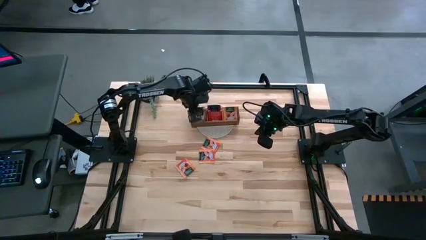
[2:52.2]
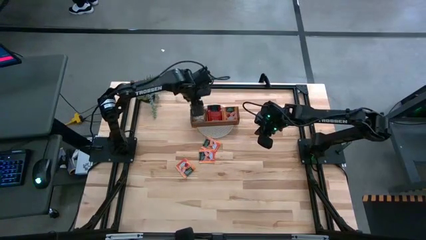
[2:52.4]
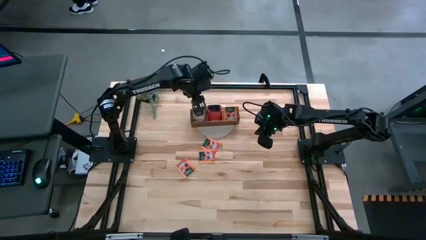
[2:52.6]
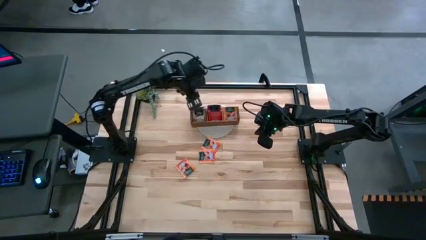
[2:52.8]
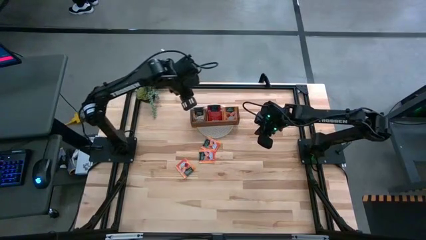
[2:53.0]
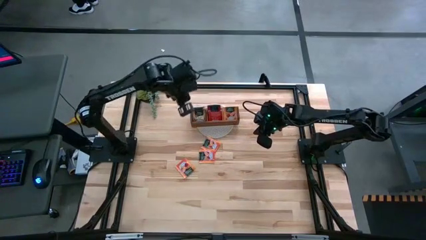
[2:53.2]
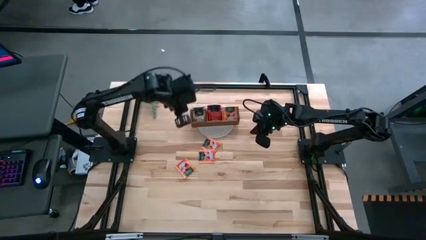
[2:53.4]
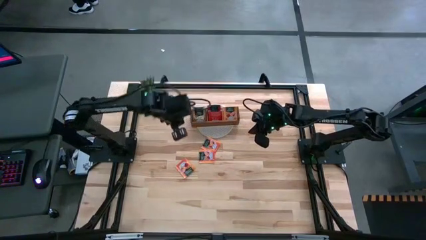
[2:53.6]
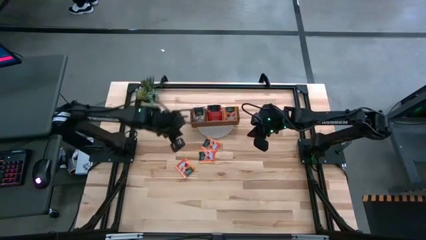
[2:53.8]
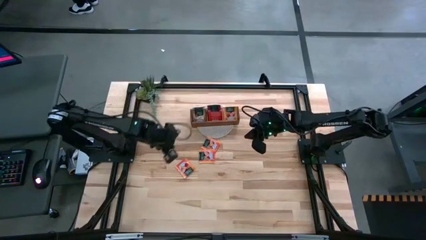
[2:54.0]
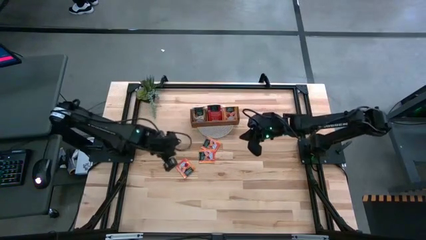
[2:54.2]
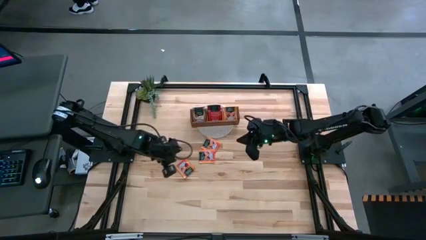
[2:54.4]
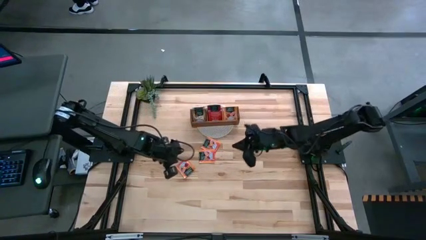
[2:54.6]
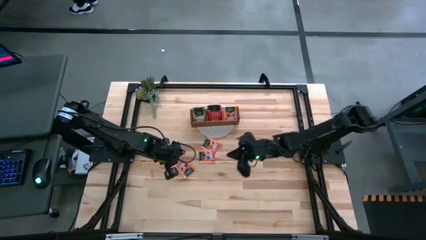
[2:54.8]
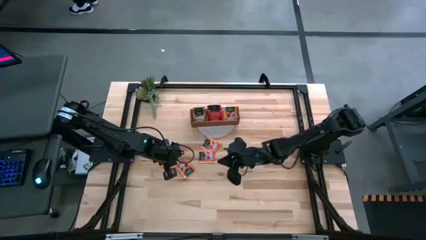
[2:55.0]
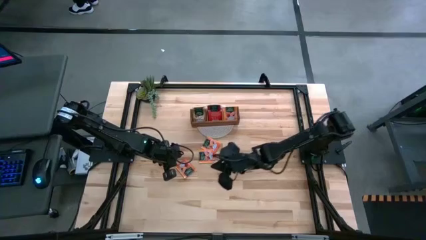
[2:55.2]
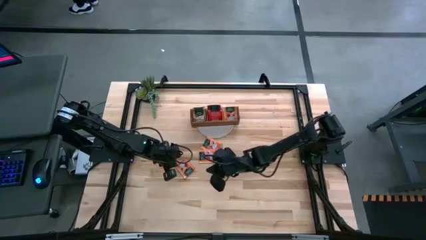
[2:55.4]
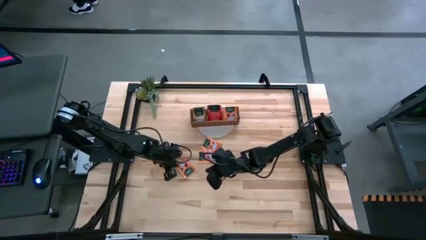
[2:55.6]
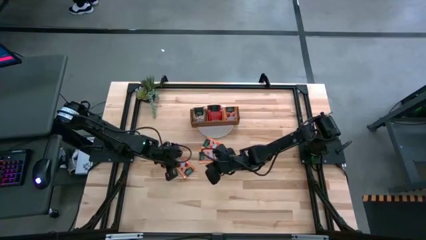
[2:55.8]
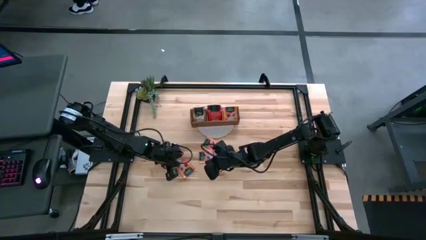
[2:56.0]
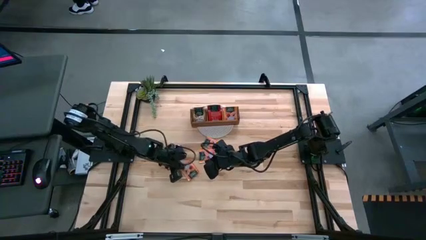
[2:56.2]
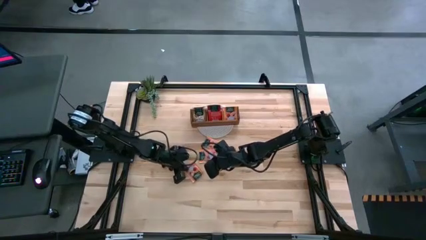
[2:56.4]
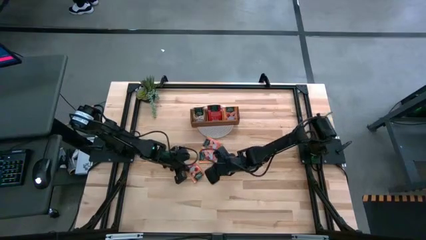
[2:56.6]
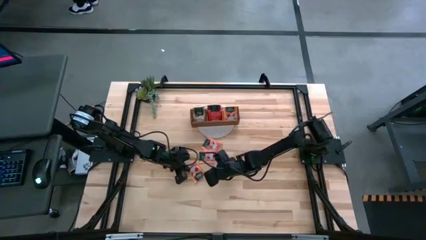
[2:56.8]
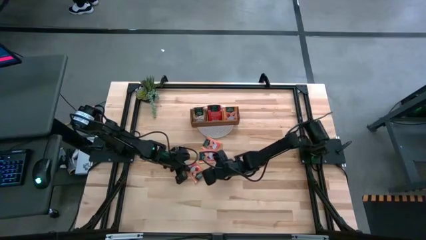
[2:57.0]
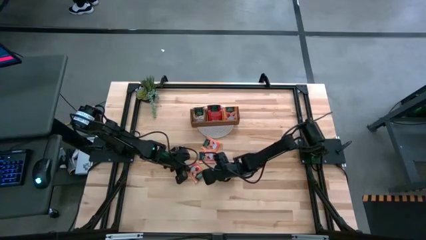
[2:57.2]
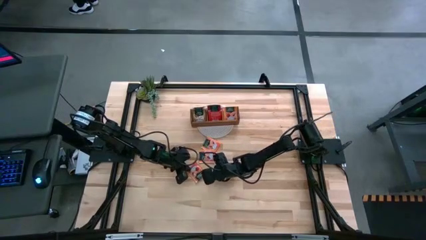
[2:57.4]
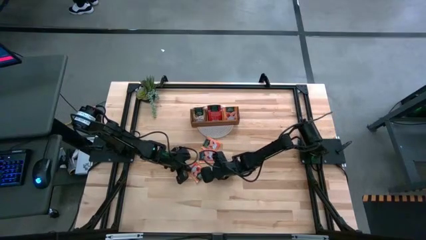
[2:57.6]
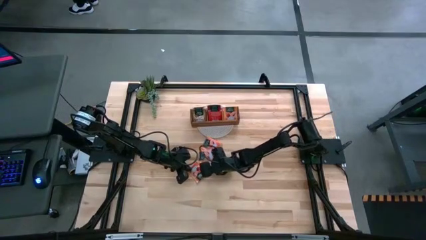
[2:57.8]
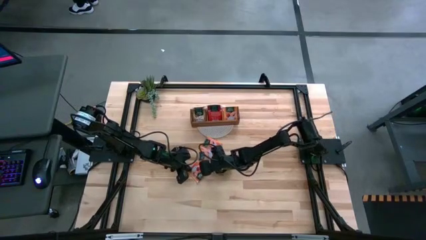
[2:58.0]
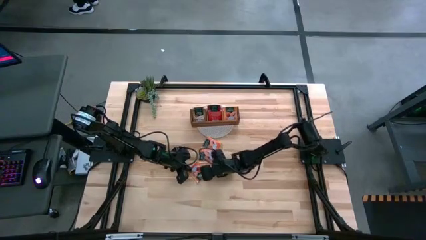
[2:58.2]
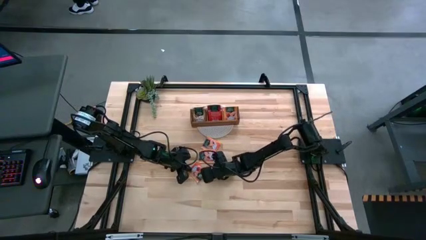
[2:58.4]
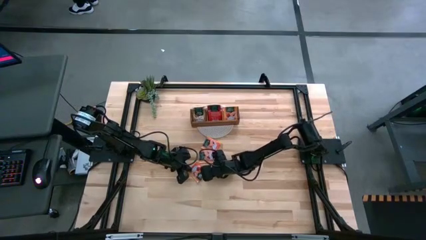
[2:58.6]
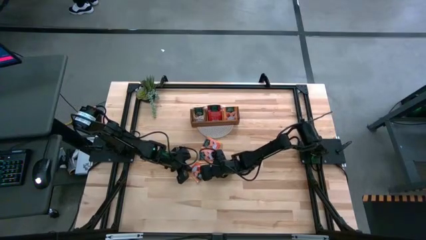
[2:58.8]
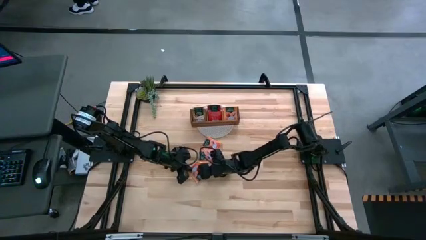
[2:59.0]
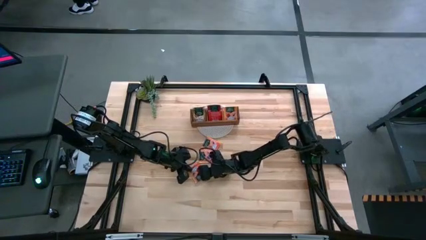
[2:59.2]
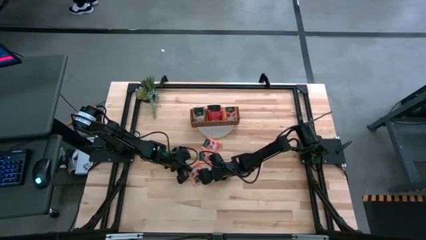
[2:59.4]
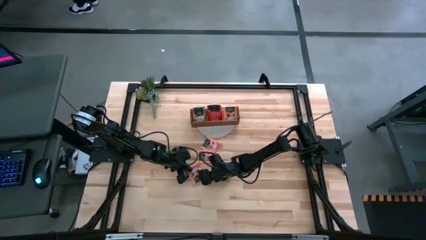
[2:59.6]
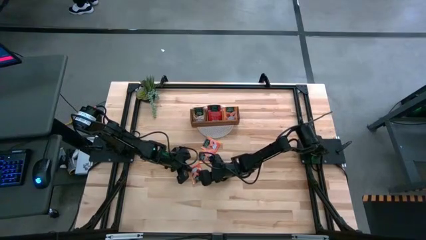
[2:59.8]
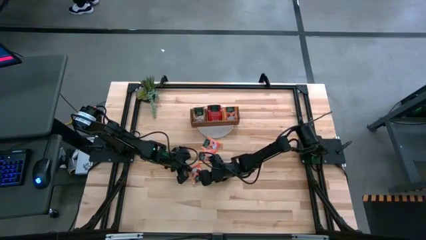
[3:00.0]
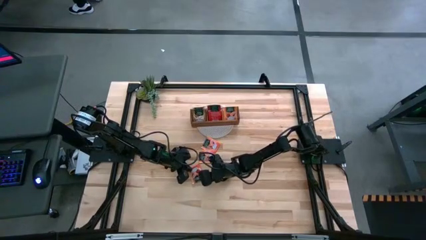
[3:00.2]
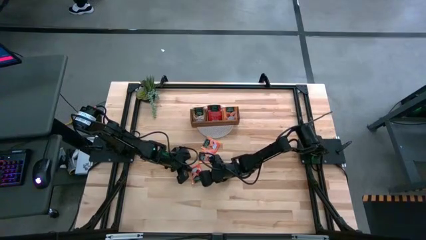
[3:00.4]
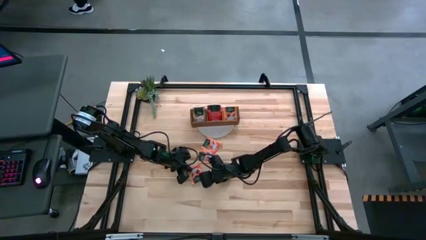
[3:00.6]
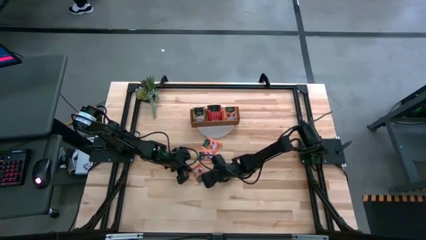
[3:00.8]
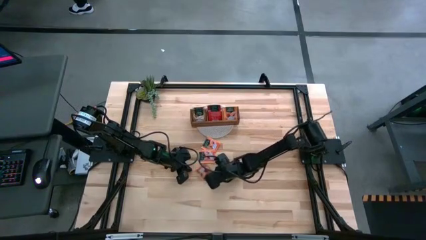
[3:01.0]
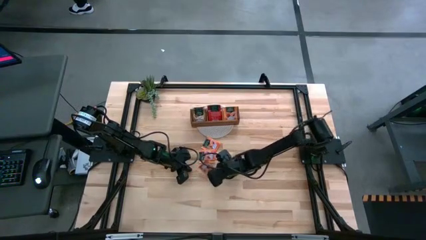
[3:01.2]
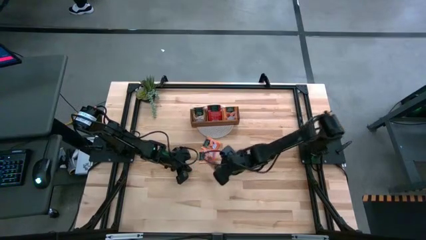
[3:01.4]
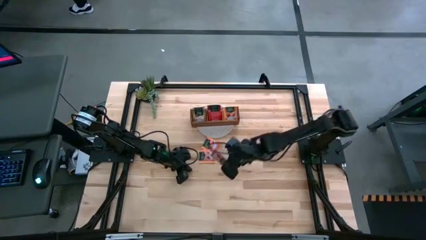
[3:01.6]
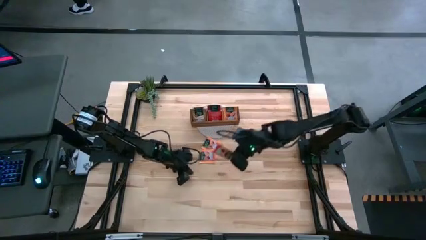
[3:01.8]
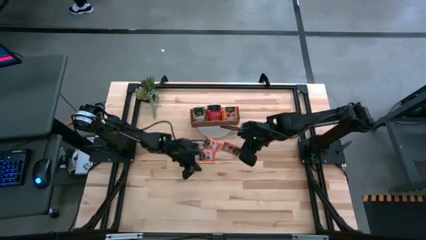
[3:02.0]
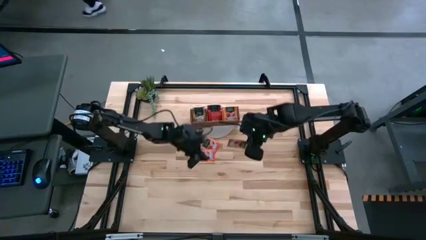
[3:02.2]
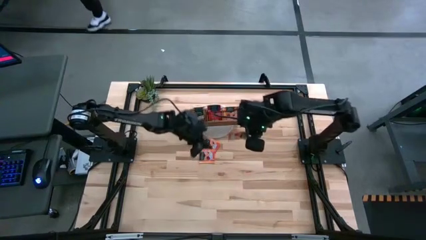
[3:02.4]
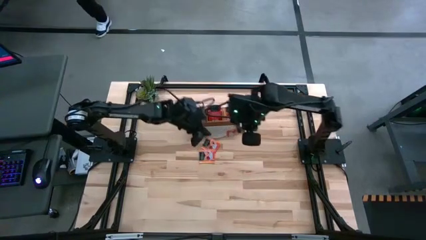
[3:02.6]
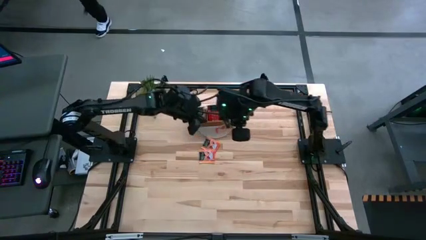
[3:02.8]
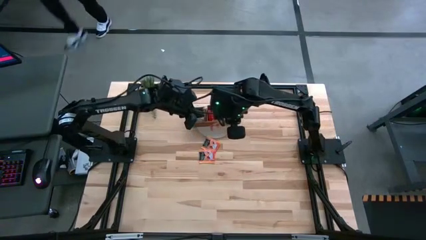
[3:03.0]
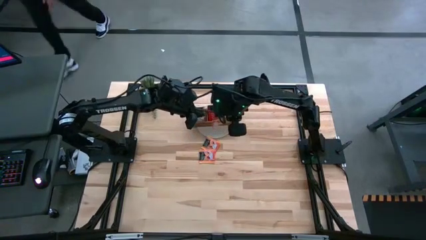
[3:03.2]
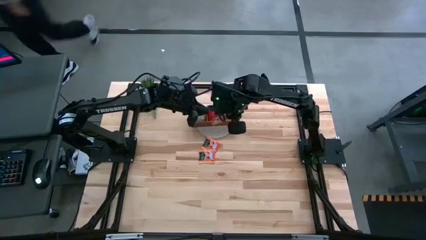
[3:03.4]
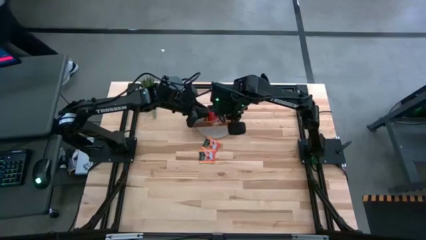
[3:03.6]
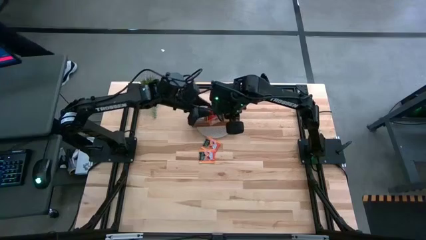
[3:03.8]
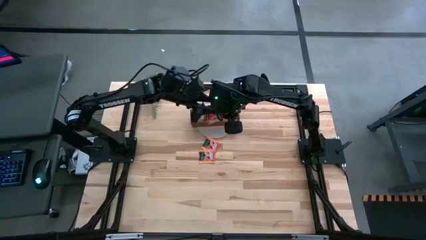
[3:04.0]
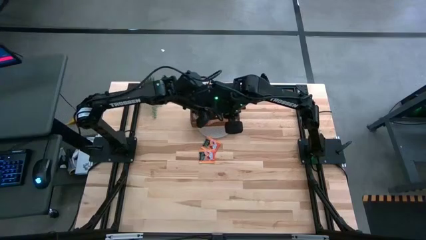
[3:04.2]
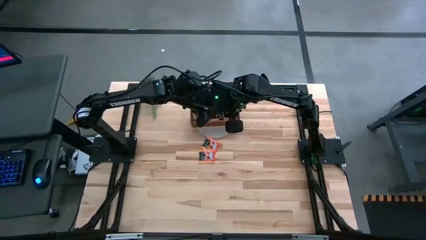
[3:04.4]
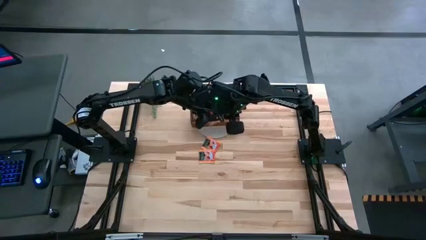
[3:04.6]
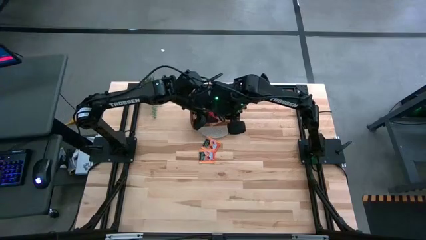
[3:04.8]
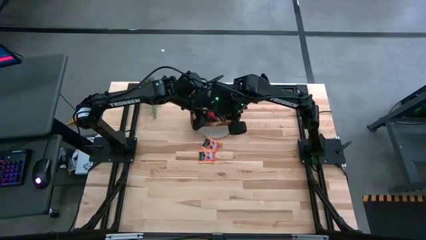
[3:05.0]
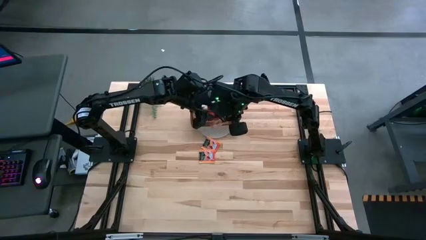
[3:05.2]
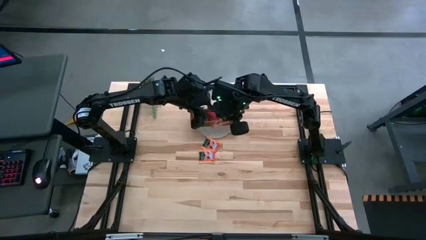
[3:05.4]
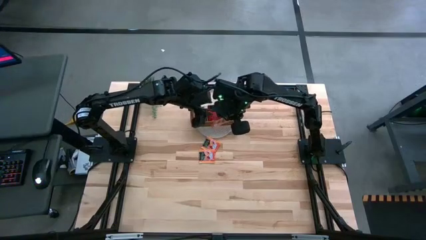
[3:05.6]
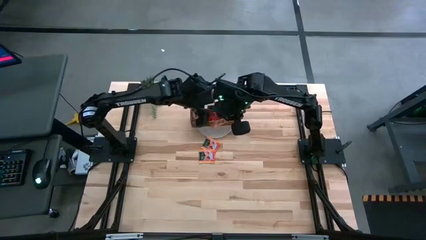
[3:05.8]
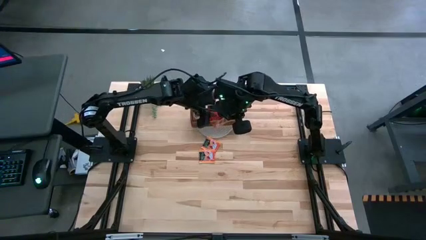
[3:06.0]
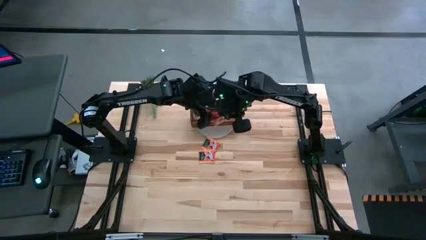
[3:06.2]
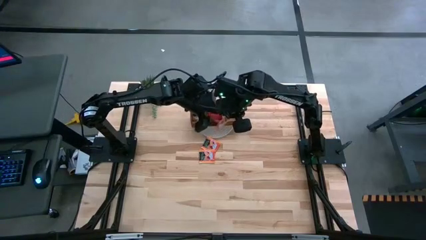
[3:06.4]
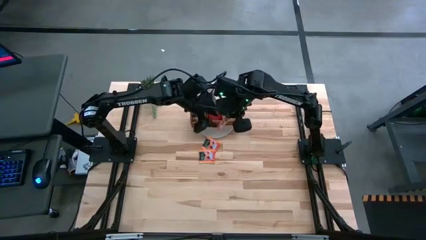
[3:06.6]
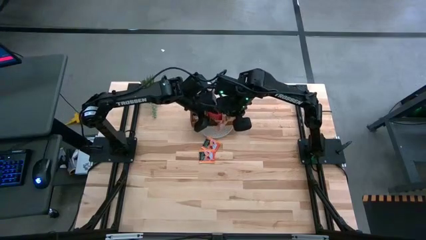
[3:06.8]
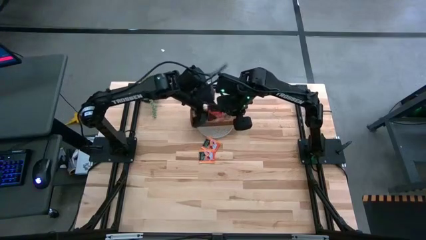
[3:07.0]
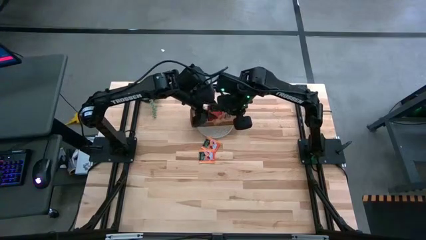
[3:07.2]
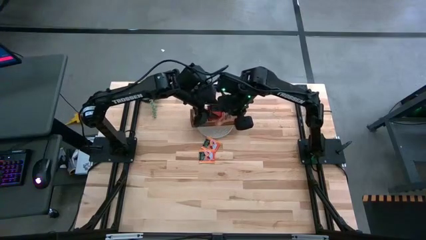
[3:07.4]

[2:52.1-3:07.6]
Task: Pick & Place Tea
Put the orange tea bag in the right section of the wooden organizer

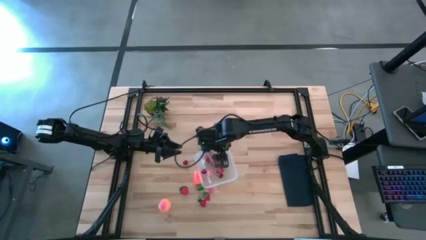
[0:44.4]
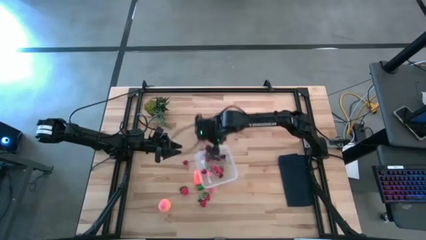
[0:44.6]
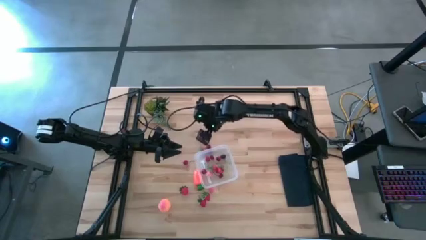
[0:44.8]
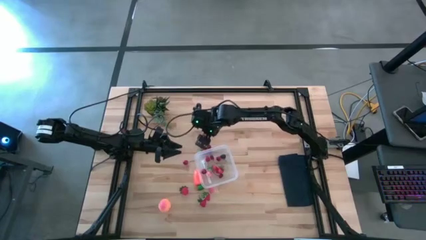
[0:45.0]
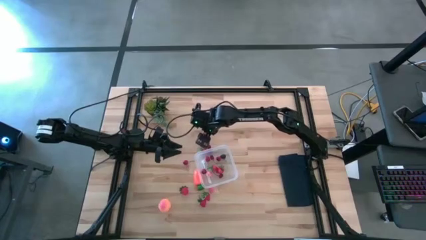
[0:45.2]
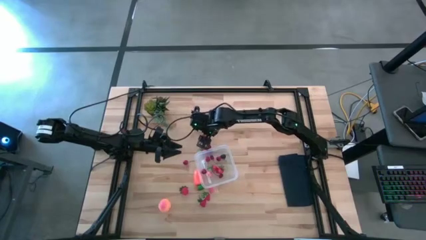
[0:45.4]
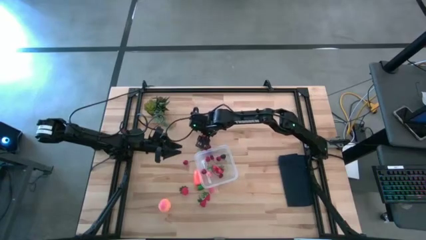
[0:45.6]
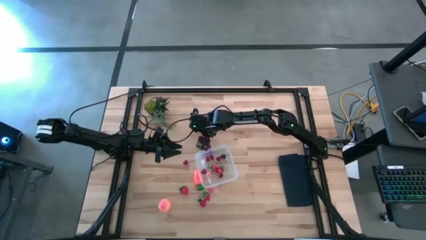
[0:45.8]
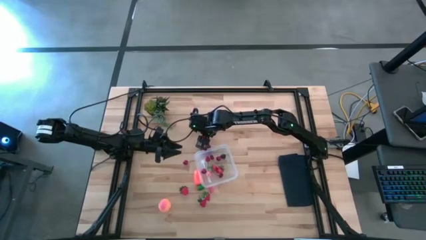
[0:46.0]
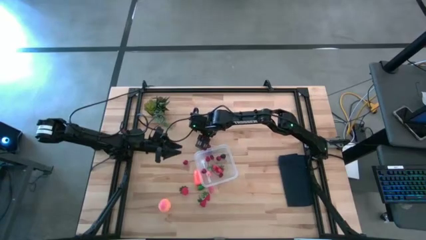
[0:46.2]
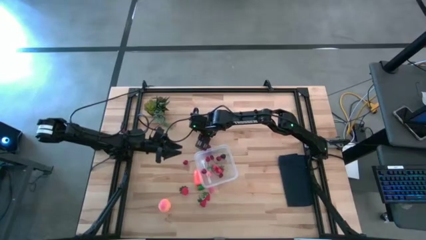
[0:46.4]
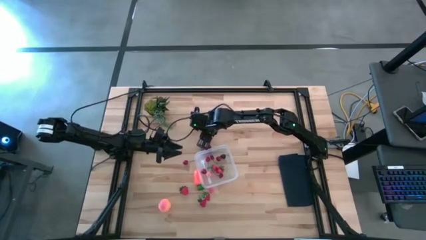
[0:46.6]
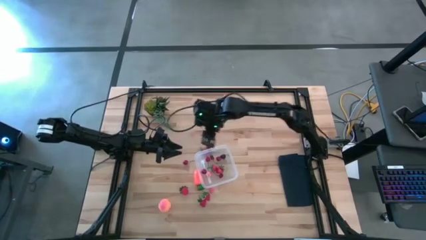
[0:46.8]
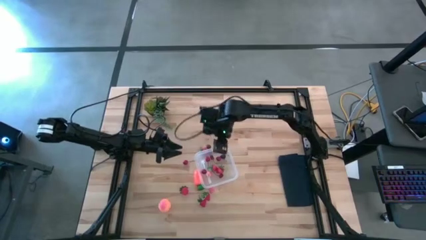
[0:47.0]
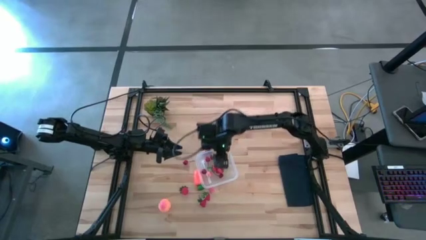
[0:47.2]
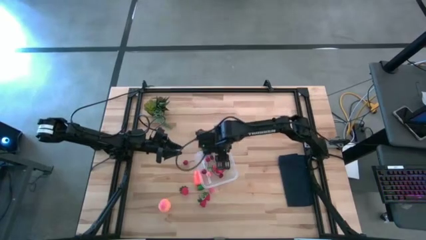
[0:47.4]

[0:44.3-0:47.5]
Task: Pick and placing Produce into tupperware
Put the strawberry into the transparent container
